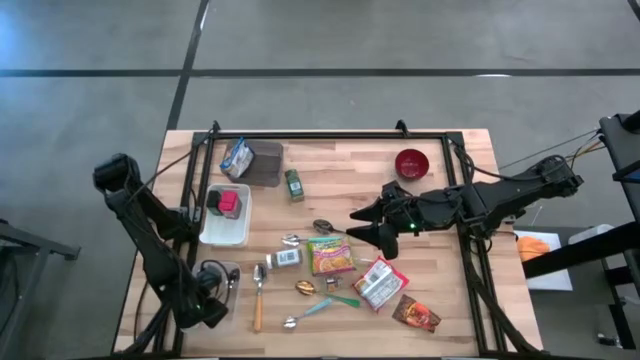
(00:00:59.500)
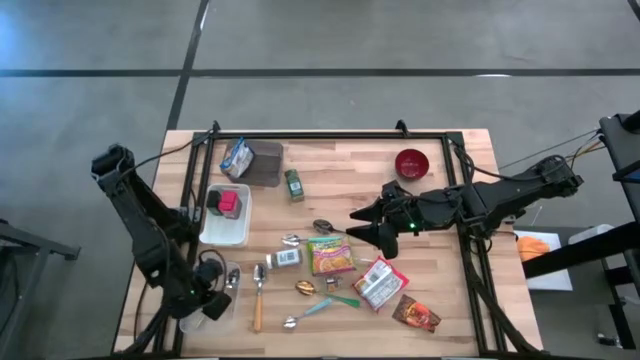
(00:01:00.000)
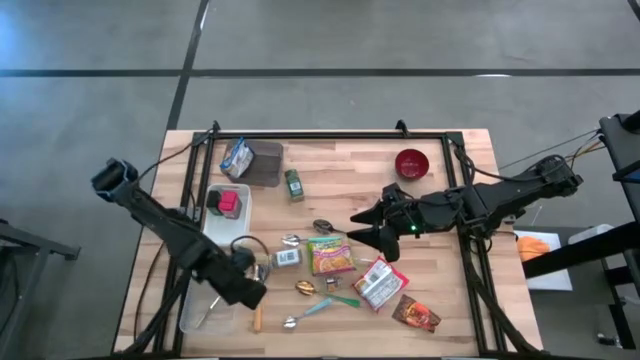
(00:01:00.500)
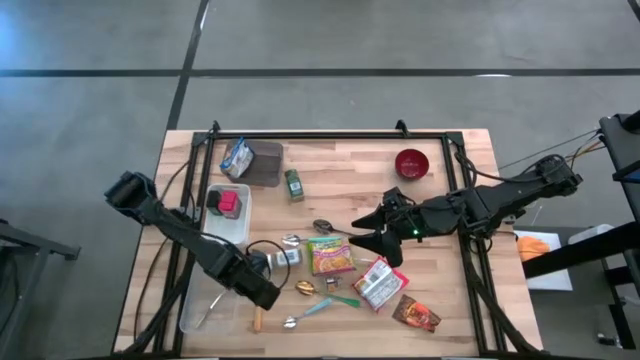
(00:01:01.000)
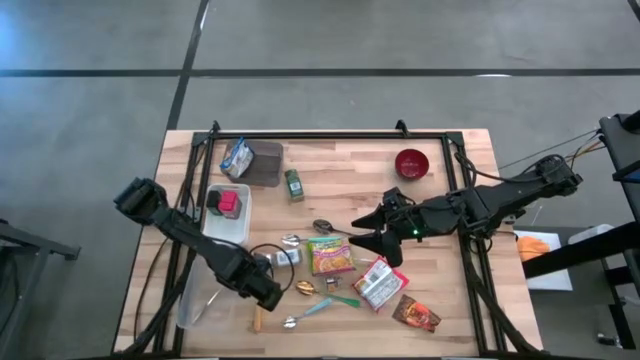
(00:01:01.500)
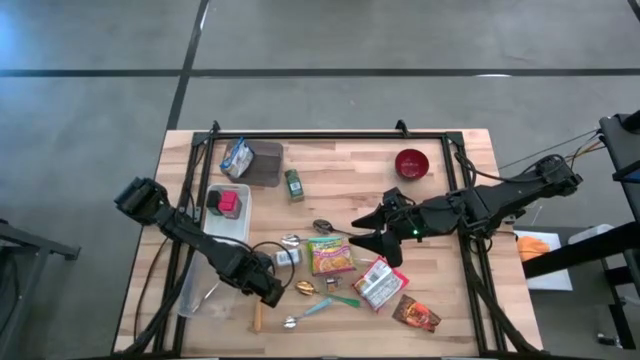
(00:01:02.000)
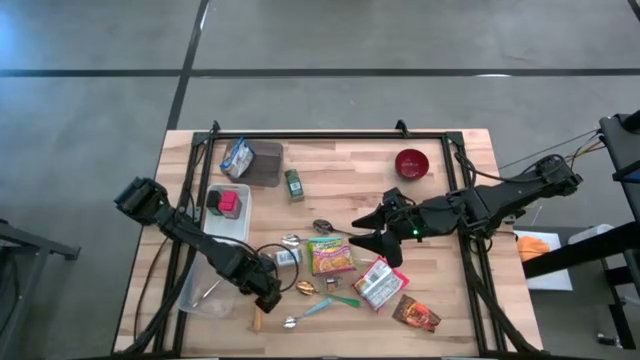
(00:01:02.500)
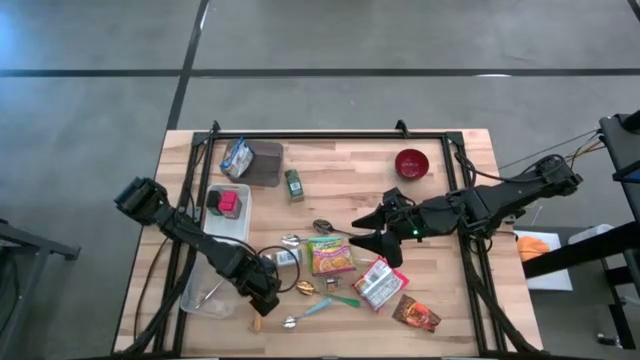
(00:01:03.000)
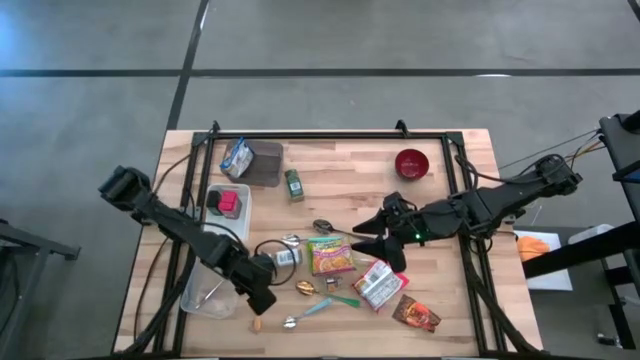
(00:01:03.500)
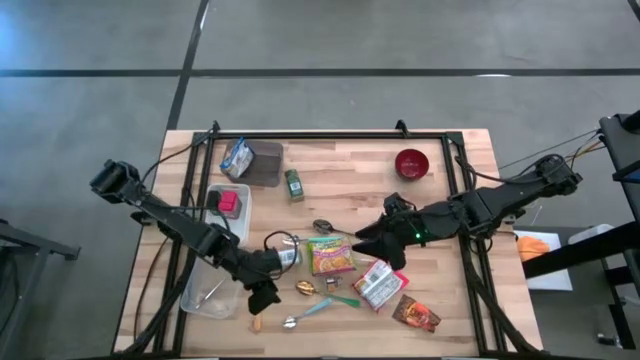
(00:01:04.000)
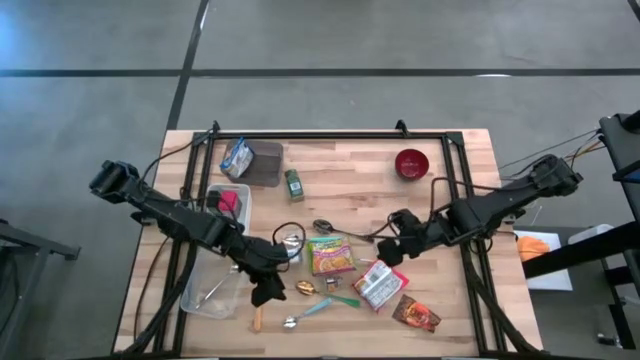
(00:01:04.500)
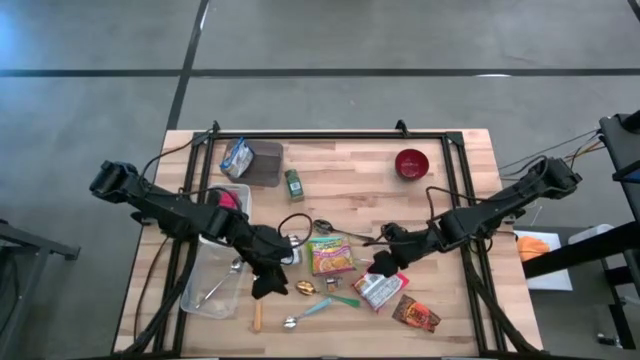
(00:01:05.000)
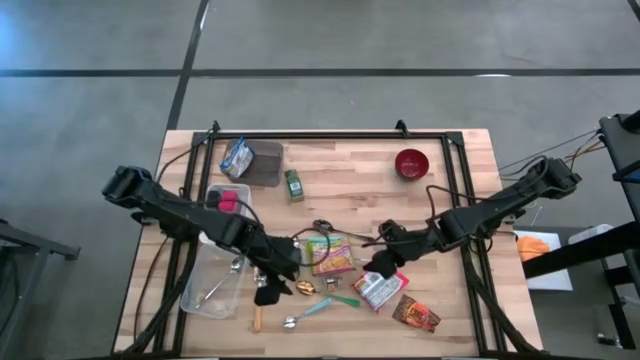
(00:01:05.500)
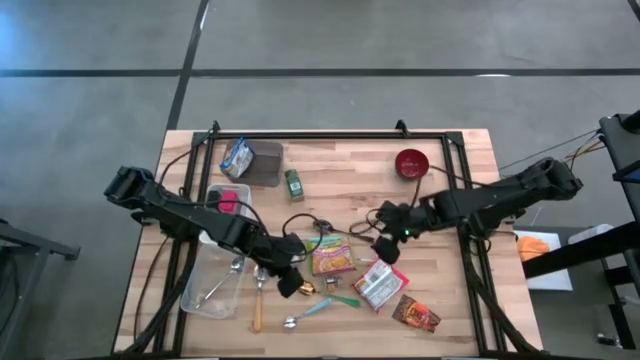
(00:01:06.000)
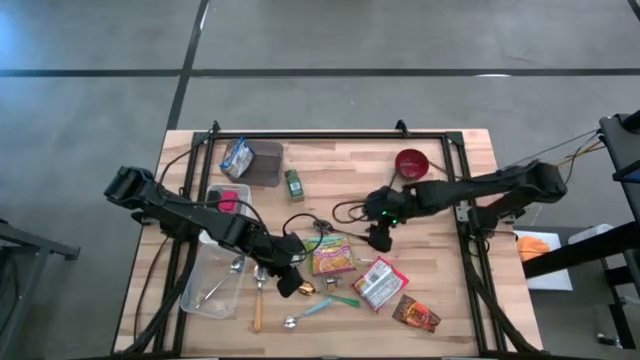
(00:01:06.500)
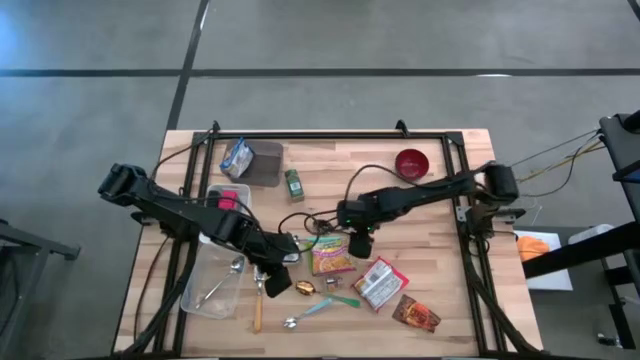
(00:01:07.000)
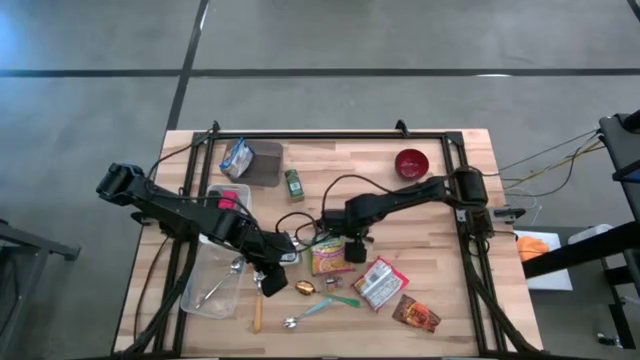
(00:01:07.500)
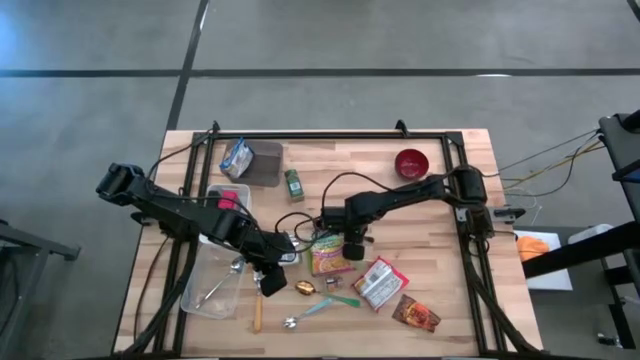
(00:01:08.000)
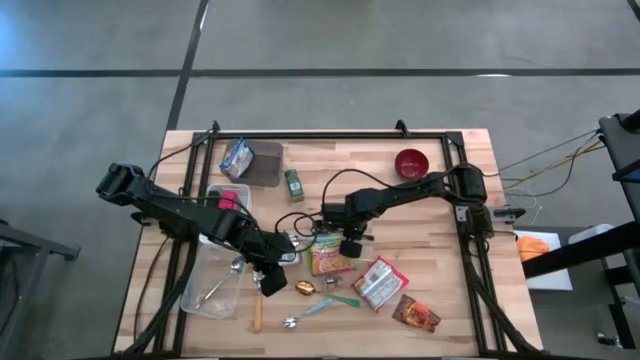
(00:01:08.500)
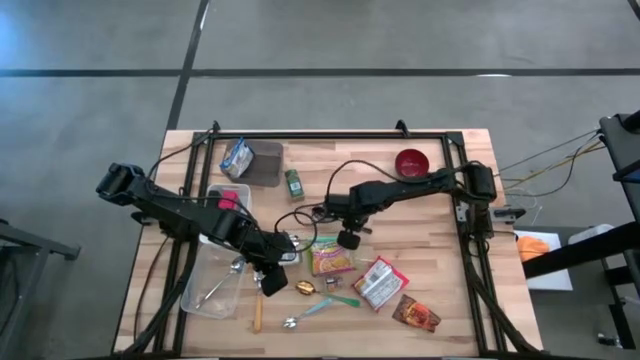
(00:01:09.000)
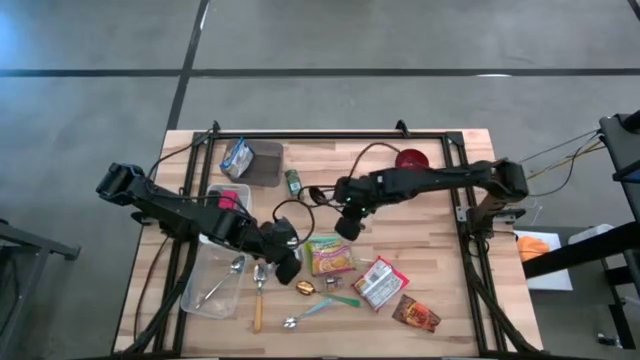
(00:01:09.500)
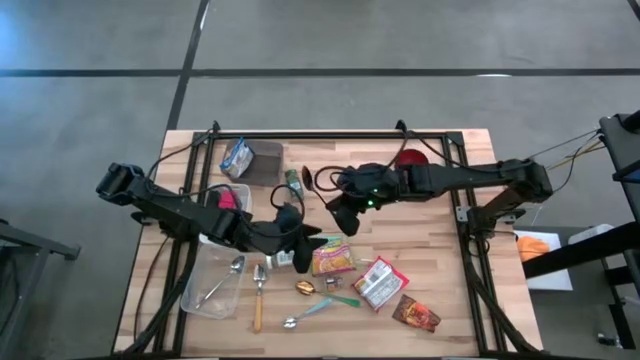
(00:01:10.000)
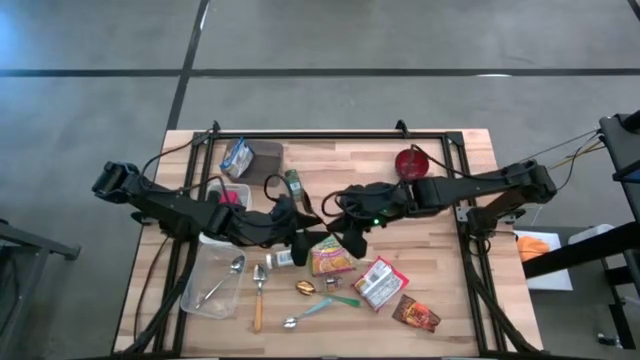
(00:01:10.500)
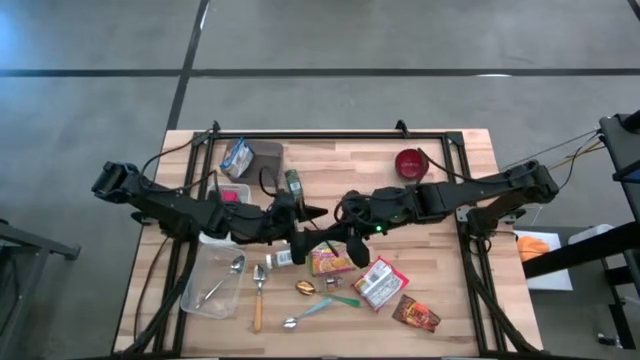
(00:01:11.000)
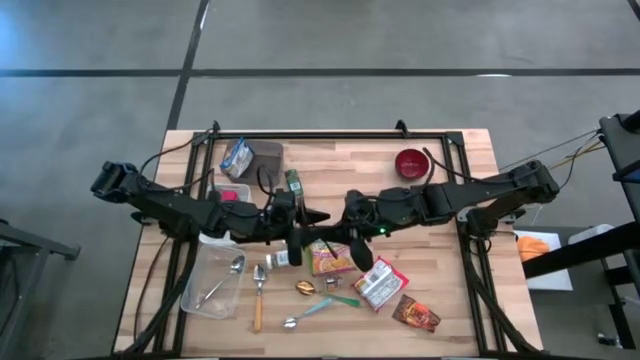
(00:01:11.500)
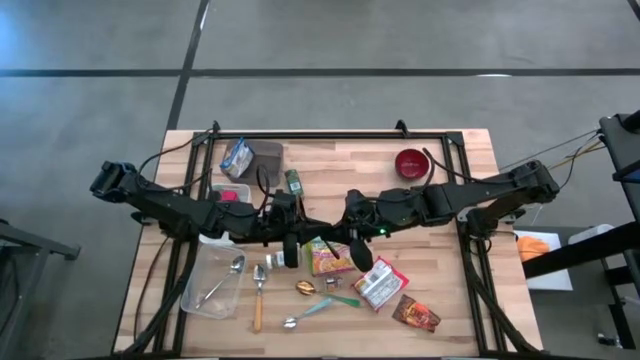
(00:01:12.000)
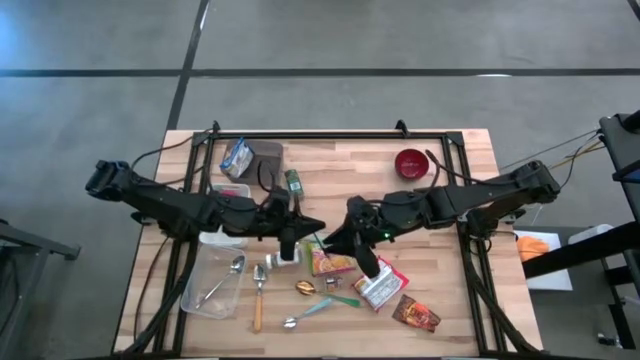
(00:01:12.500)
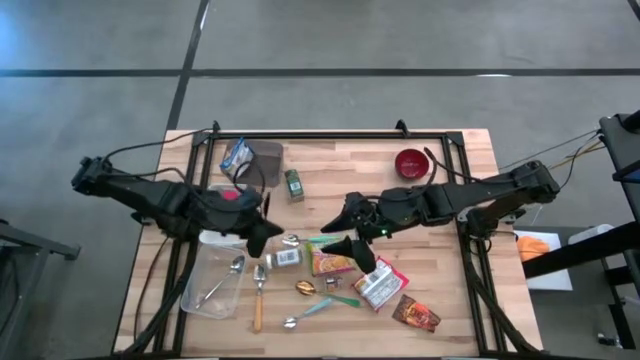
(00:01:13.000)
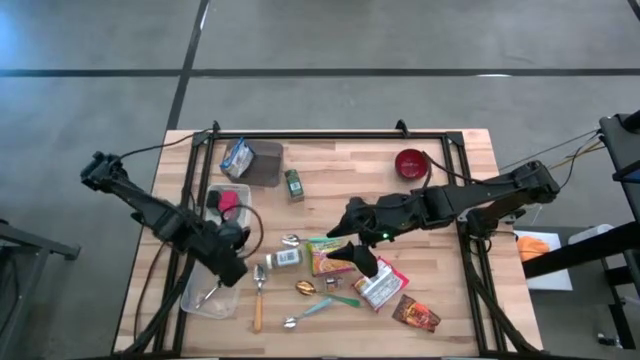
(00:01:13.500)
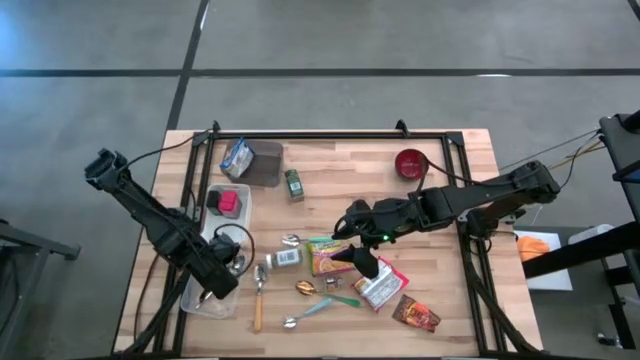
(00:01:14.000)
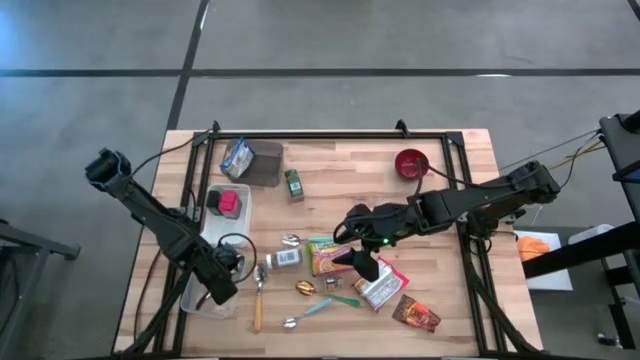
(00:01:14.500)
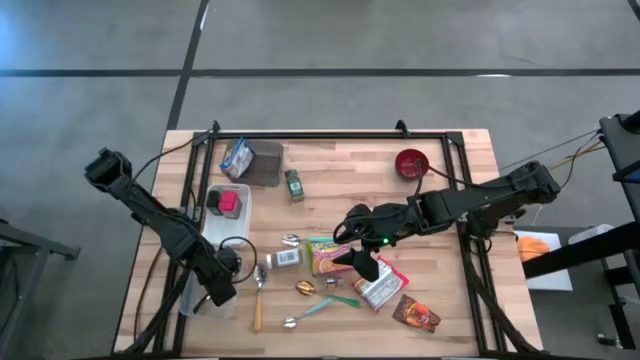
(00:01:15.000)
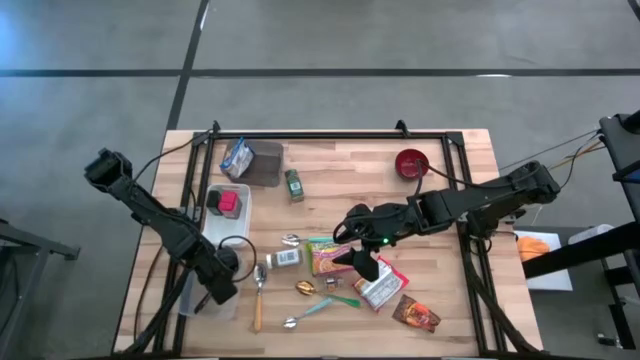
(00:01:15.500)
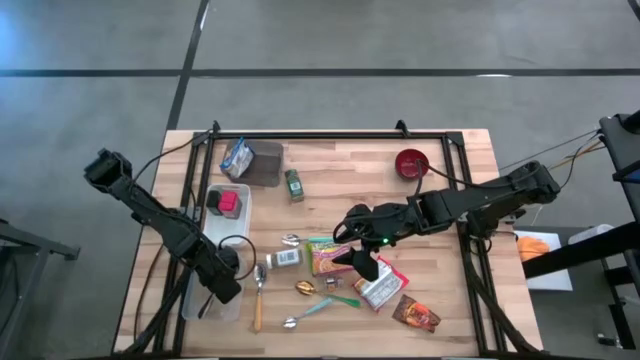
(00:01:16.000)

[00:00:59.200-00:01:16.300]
Put the black spoon into the transparent bin
